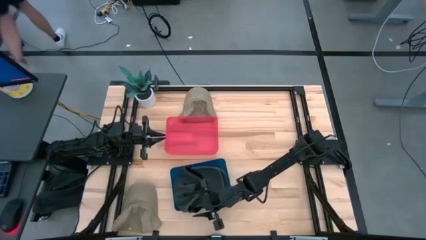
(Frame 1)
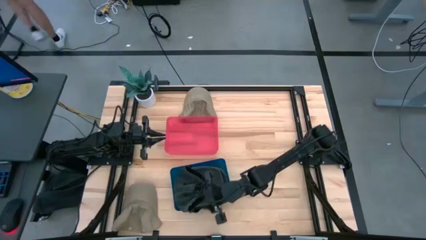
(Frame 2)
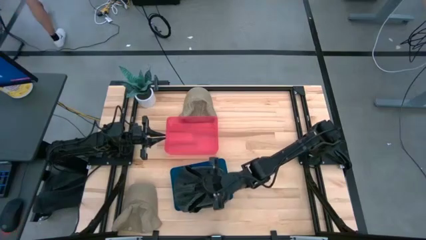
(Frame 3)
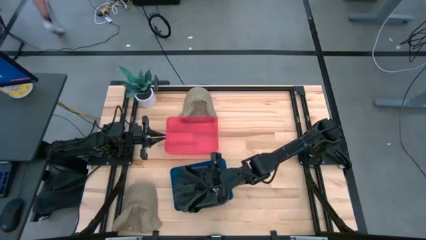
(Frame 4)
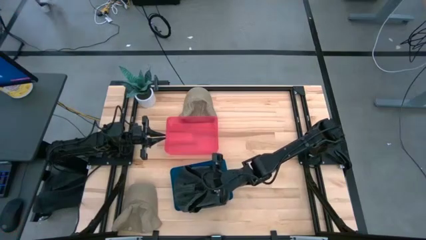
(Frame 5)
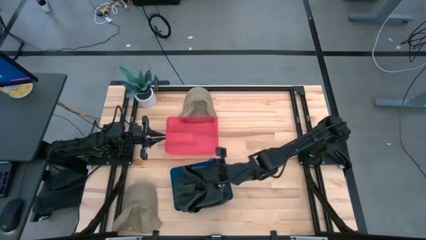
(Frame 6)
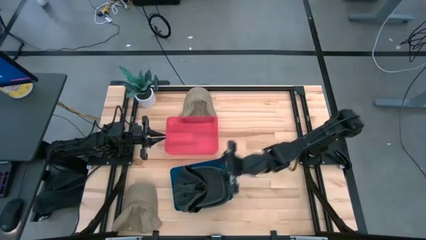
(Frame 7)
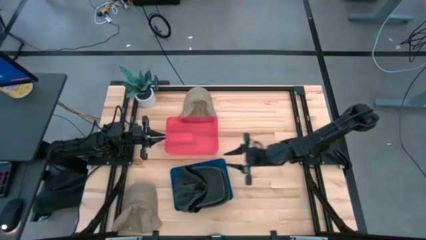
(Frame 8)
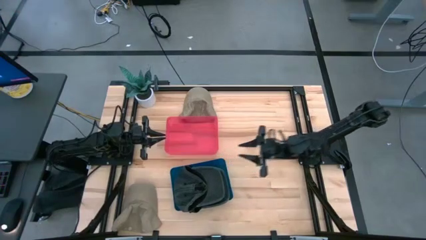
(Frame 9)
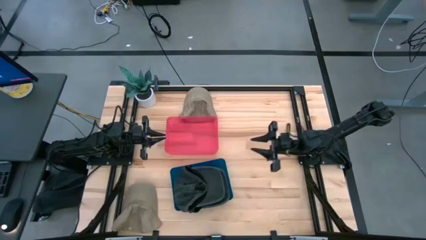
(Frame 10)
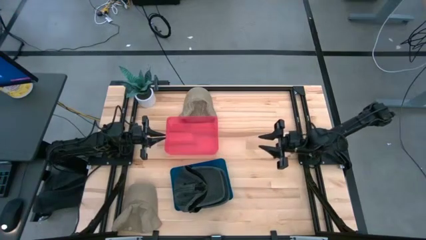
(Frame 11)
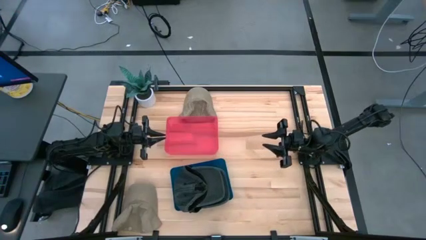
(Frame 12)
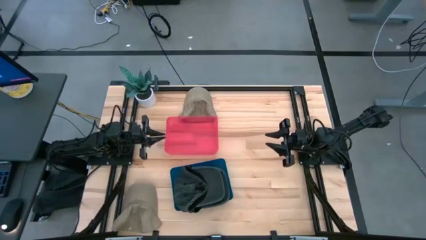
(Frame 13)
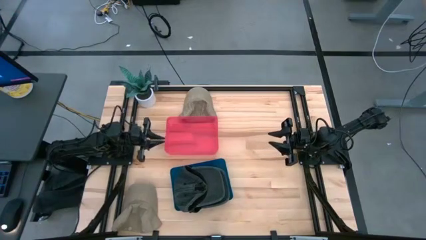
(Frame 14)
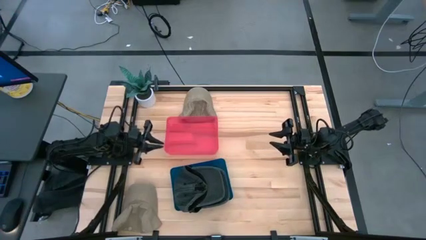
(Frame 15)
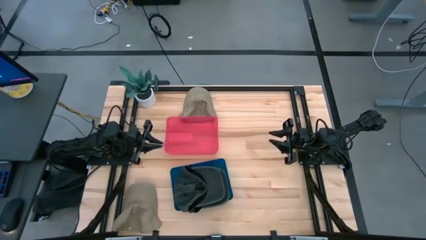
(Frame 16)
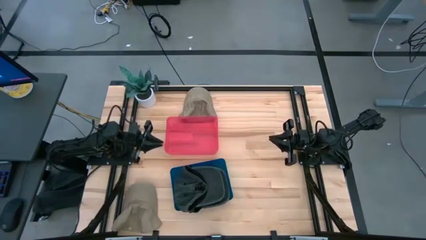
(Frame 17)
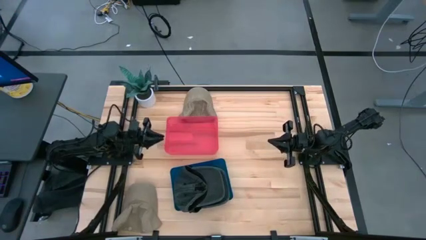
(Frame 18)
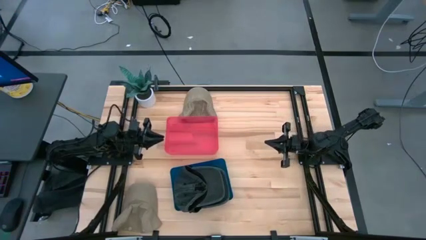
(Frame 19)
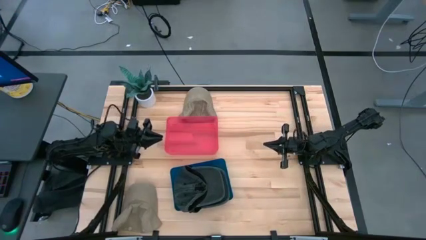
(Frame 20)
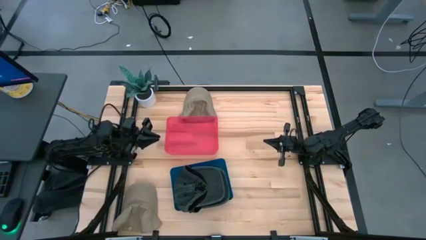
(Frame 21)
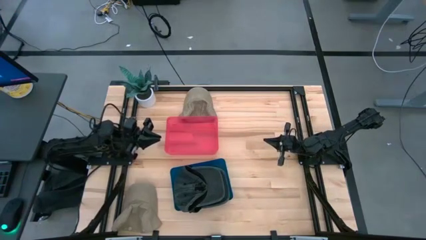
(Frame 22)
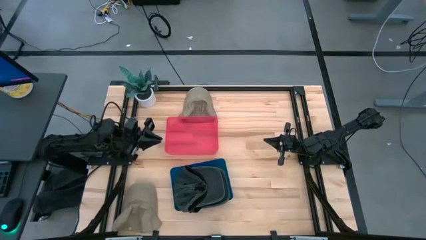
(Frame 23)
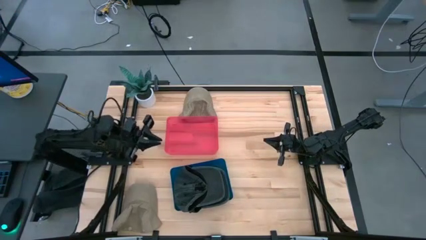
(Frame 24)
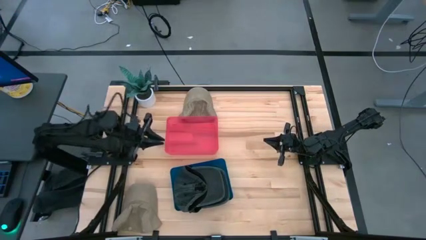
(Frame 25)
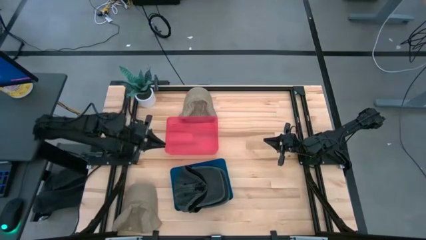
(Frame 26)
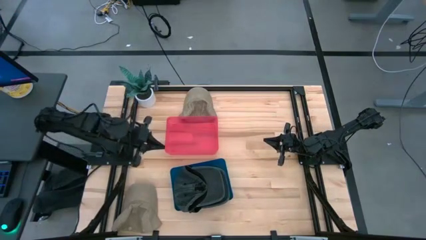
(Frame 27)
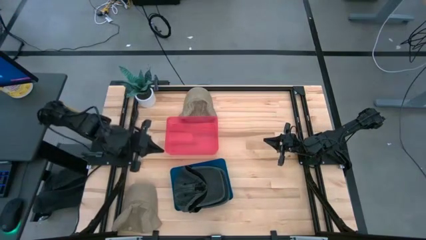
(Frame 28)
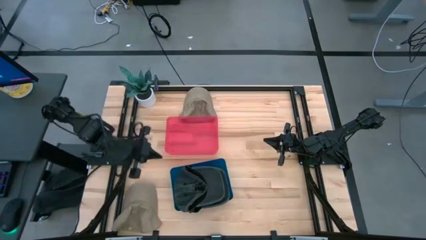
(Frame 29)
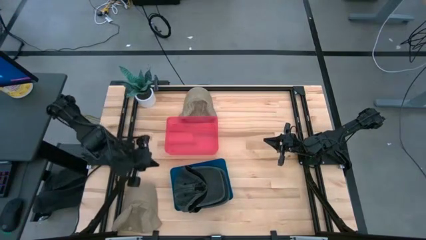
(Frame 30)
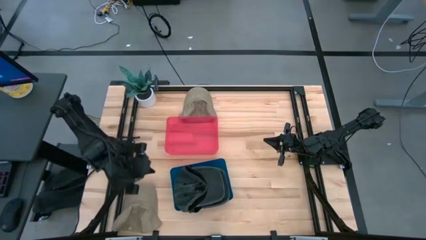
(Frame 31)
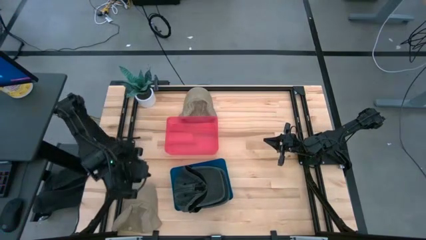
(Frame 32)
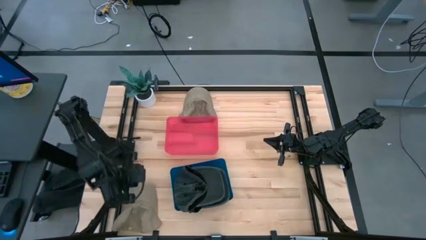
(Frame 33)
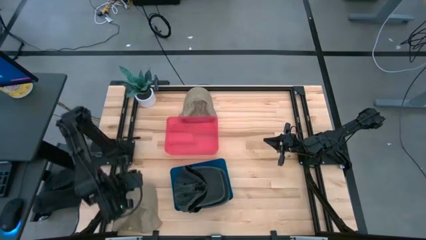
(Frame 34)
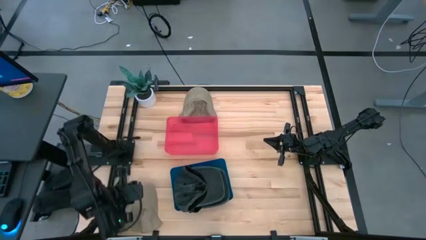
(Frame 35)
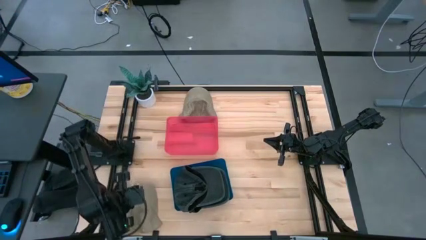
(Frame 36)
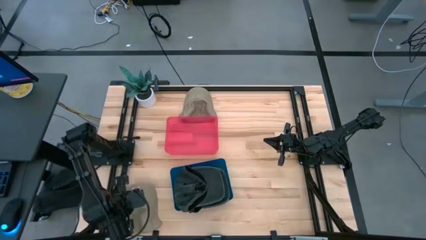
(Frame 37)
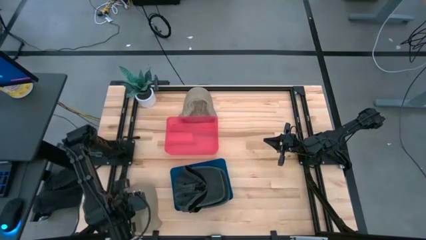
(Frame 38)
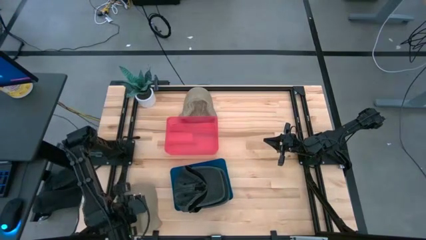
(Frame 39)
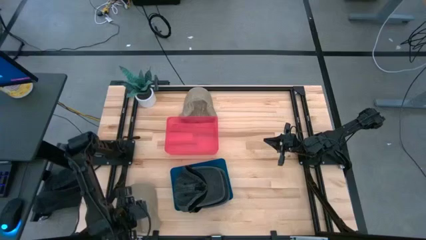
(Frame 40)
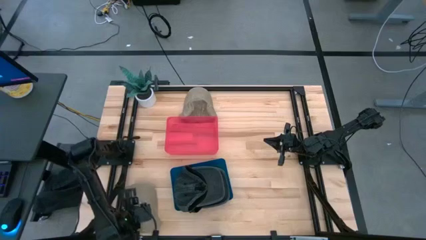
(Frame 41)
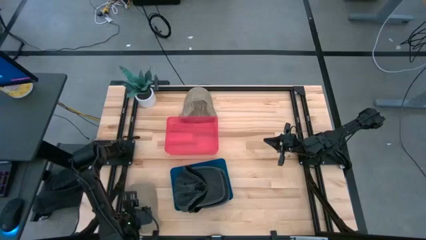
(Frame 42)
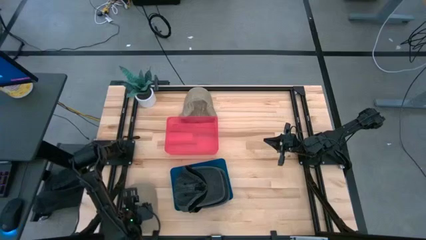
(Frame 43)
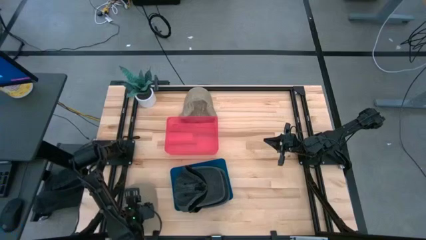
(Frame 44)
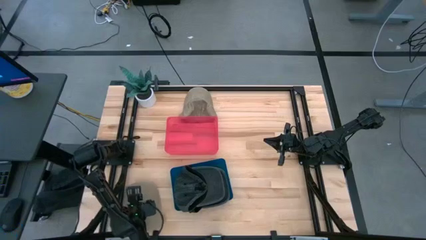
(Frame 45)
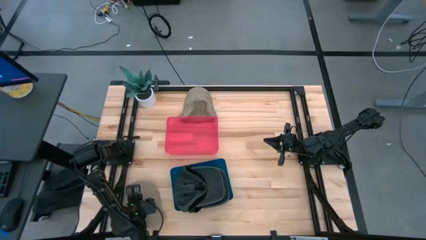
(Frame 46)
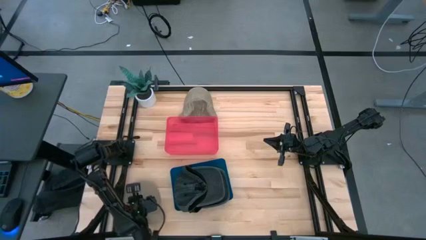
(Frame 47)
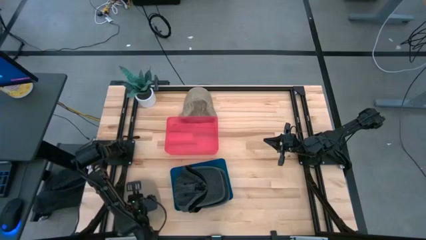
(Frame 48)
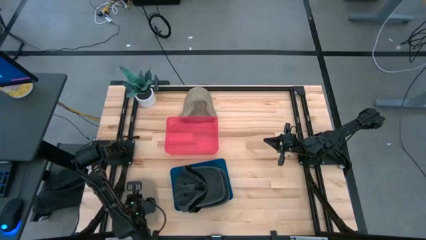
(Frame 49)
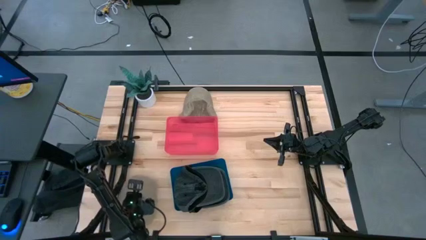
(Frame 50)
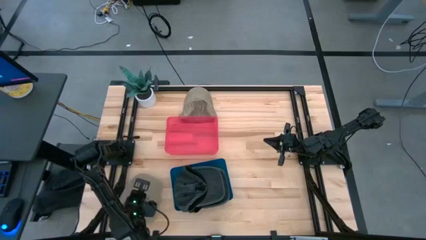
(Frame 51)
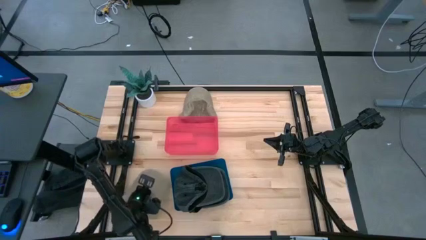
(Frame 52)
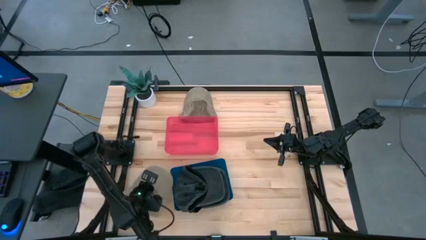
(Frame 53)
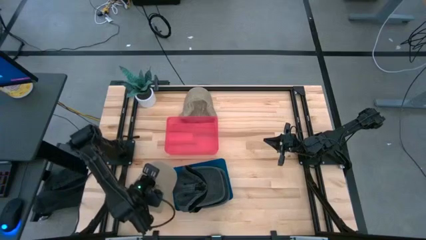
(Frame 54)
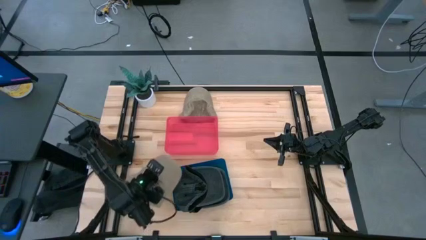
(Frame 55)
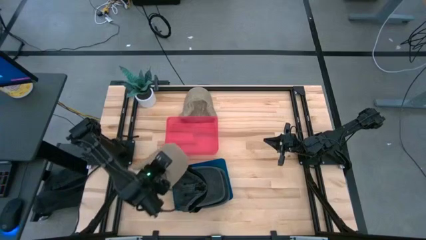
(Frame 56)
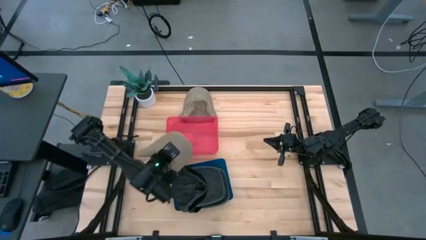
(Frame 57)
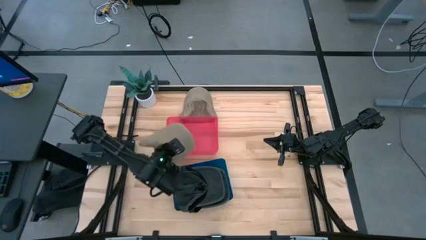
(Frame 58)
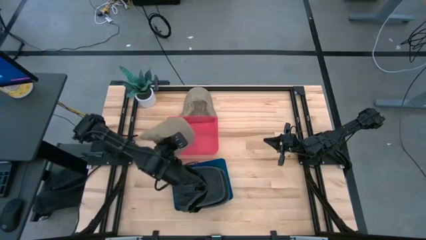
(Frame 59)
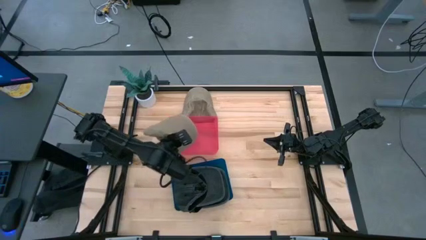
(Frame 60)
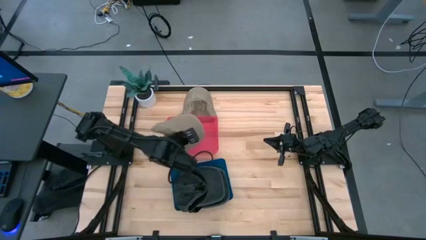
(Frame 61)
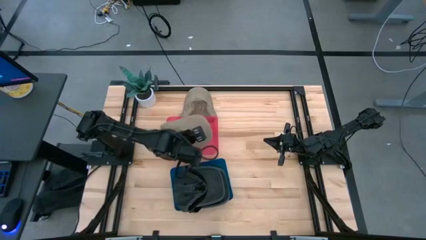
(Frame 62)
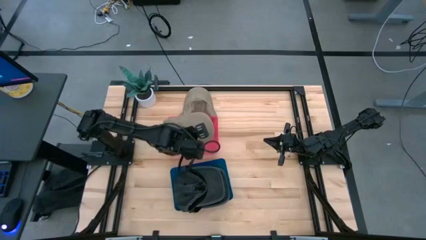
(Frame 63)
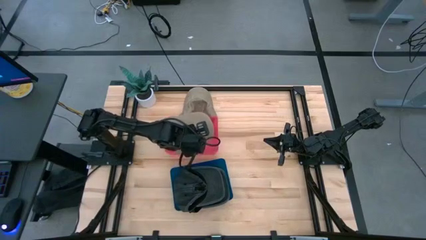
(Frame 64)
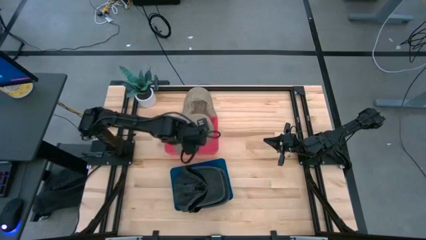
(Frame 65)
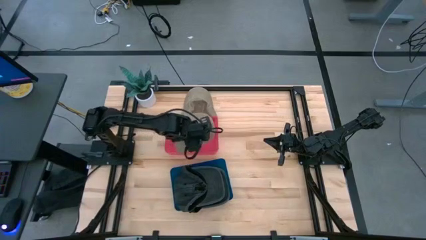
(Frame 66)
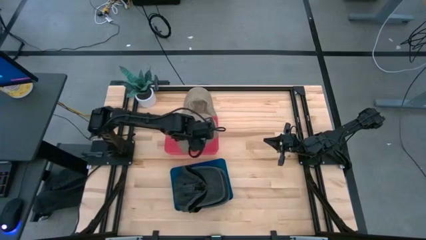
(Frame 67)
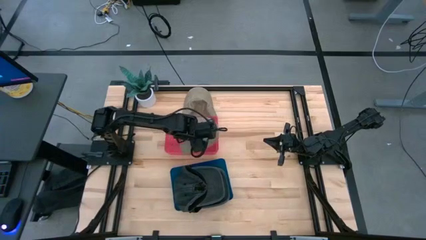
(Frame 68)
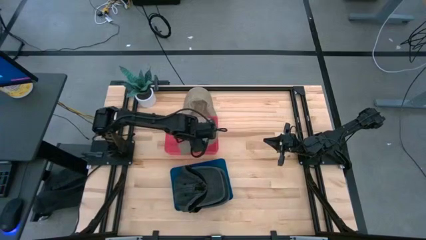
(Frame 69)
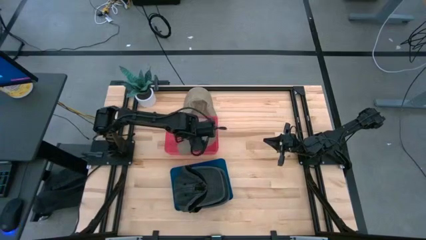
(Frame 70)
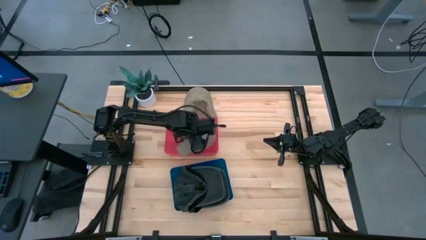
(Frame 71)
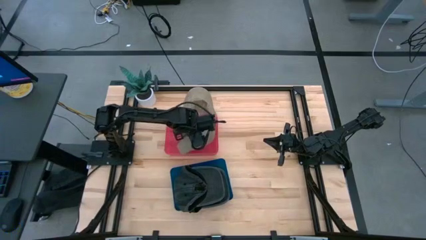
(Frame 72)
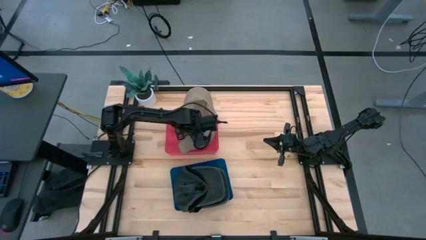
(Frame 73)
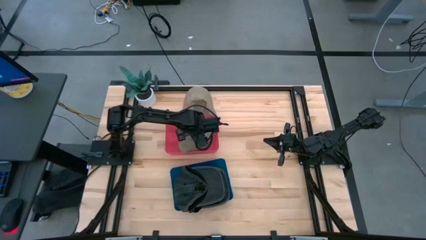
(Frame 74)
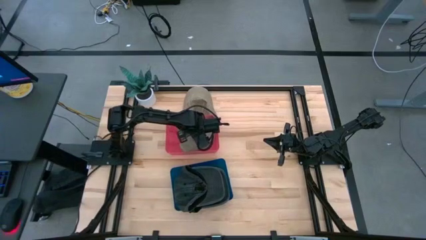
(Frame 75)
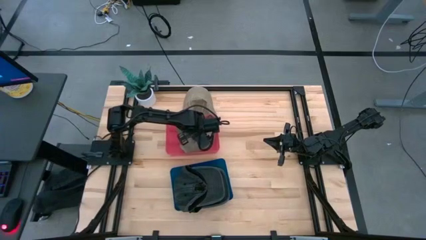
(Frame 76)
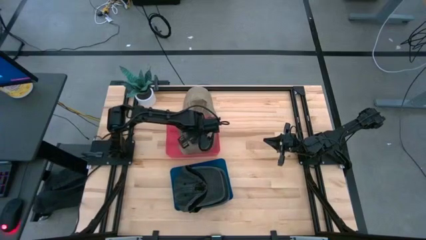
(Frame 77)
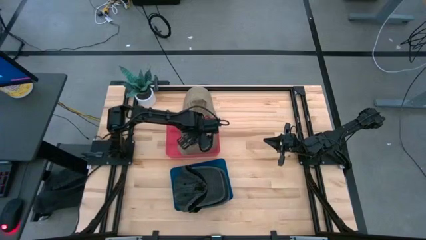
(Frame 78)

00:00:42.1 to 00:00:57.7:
Task: Pick & Place hat
Put the bottom brown cap into the pink bin
